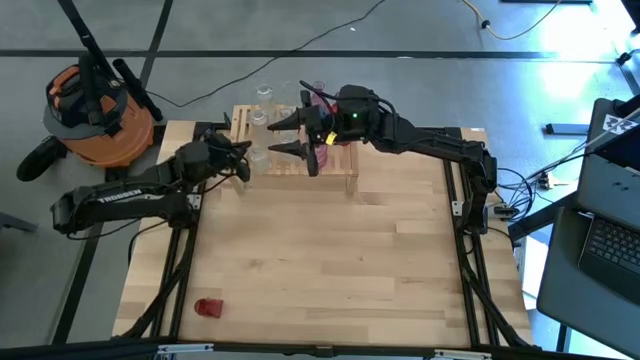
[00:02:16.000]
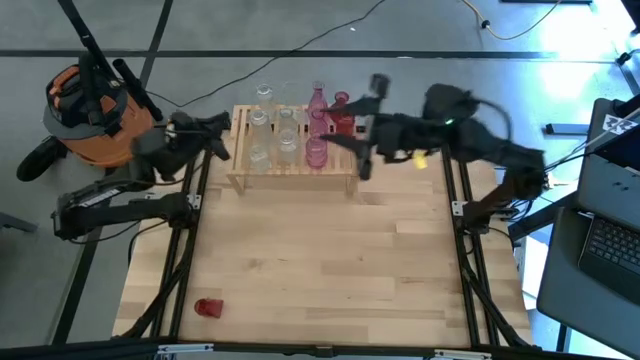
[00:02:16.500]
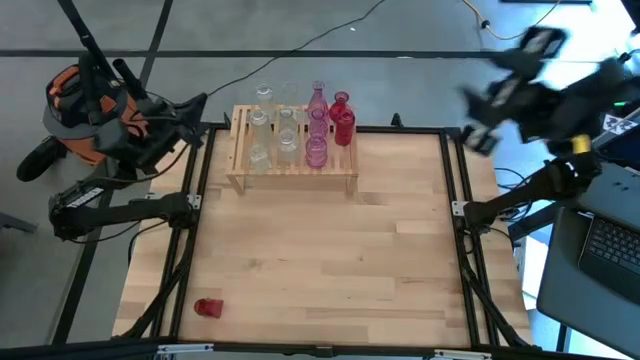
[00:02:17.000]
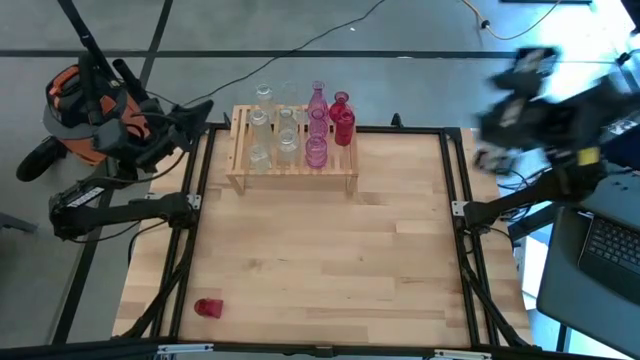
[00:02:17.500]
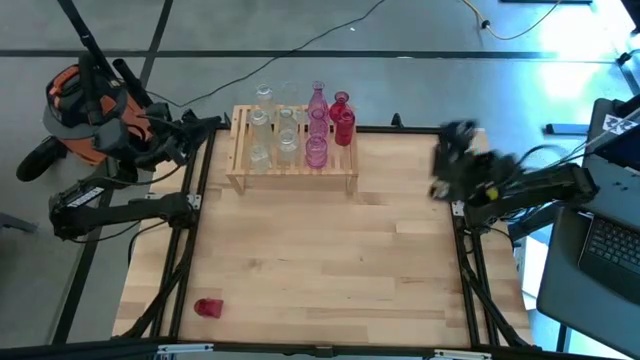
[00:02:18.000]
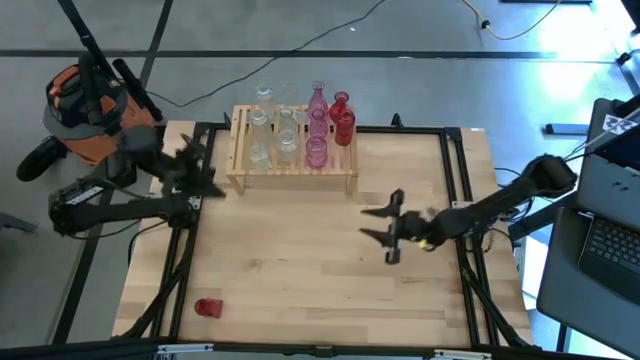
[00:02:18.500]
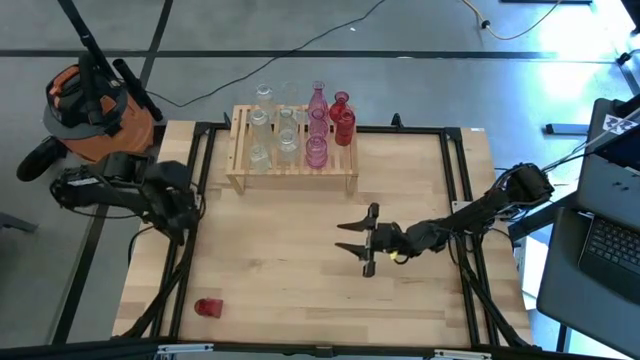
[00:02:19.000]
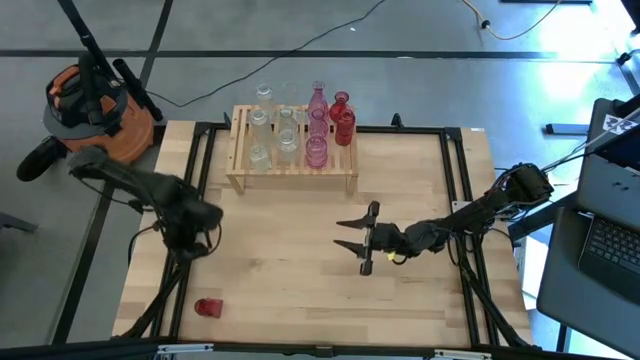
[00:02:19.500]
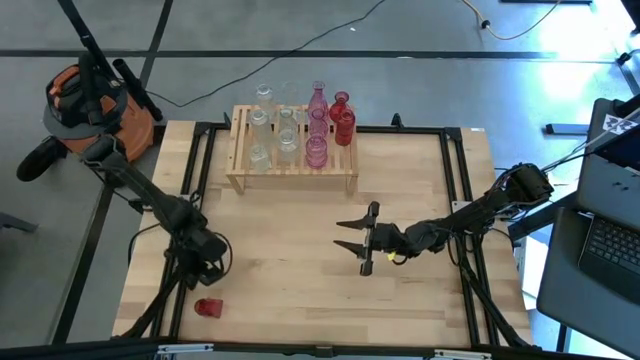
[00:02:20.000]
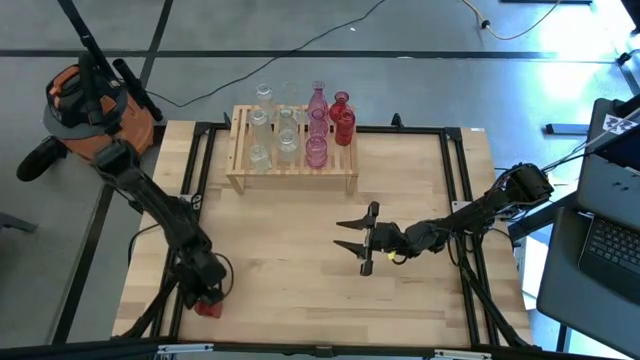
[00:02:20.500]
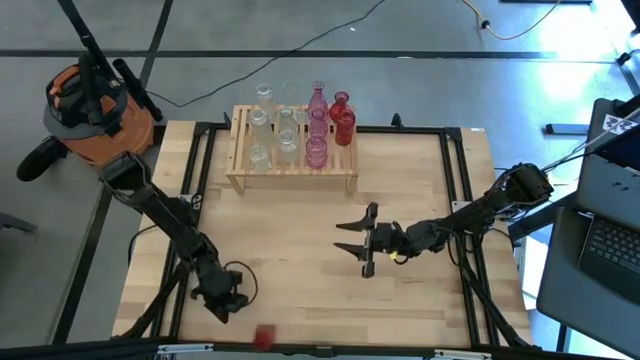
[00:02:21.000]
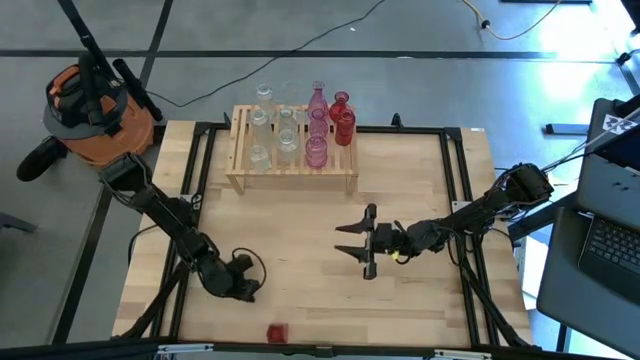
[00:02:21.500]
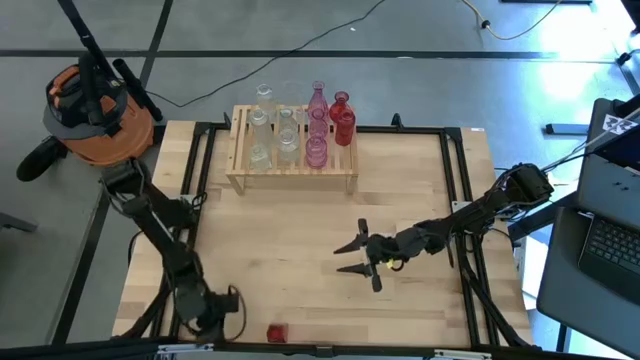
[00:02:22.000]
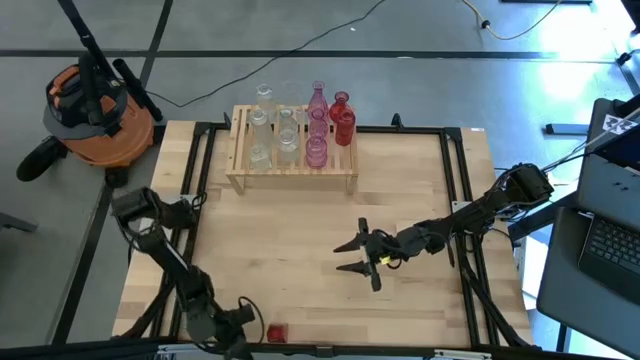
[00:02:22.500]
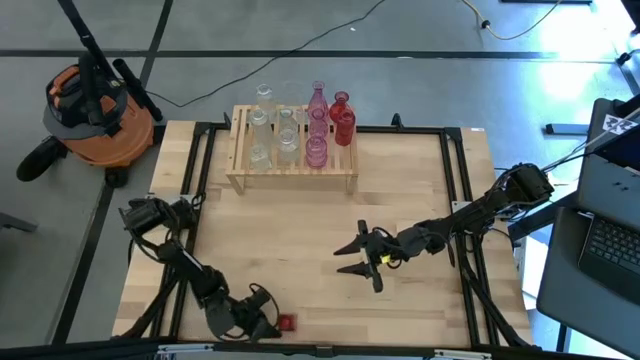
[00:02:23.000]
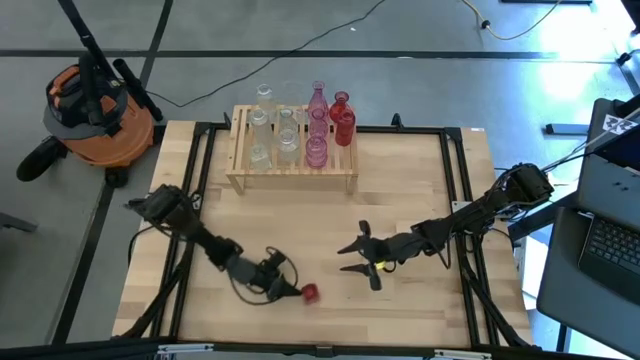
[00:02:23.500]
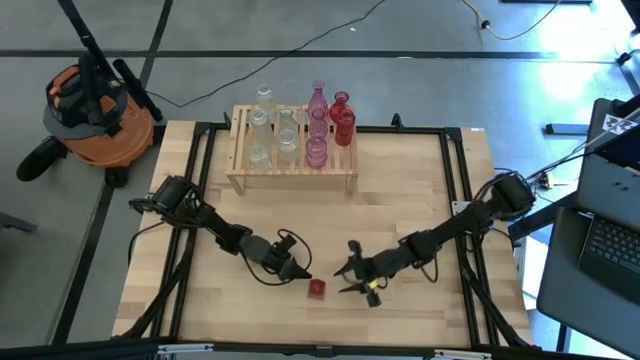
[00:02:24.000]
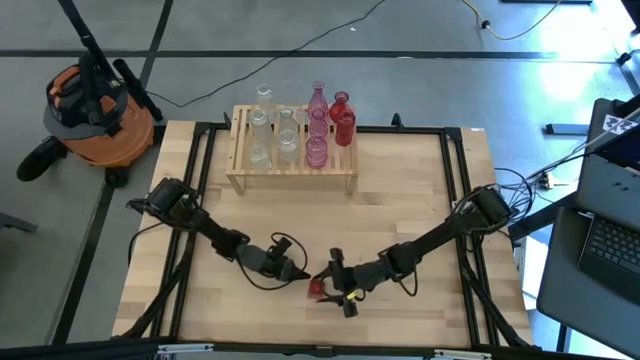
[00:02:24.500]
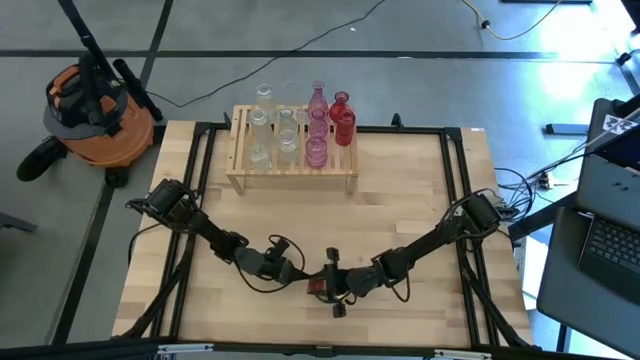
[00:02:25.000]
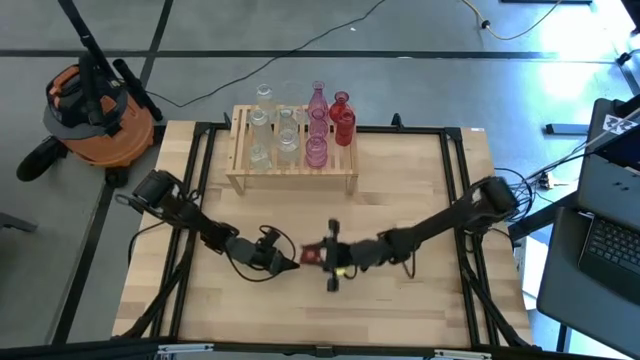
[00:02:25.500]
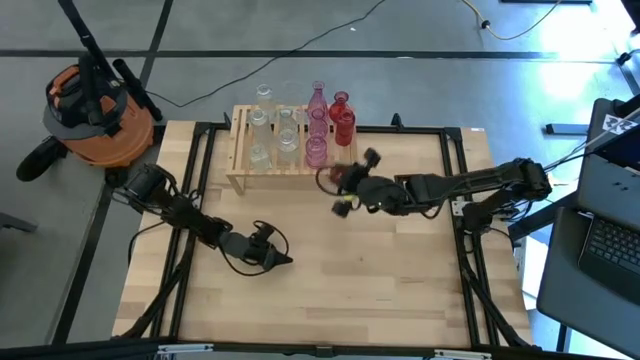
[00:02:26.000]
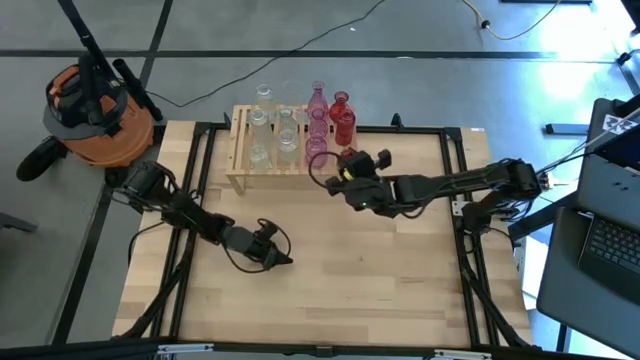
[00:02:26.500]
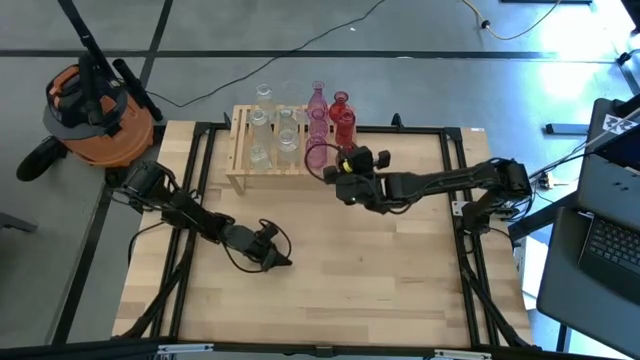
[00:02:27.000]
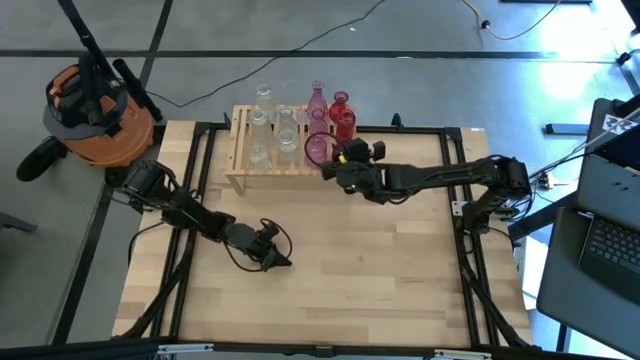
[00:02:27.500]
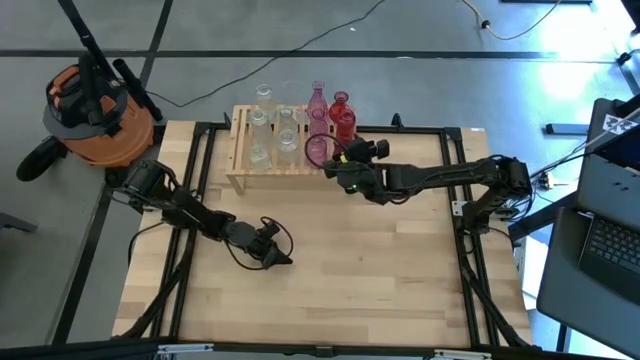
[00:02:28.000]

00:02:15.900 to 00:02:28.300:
Task: sort vases onto shelf
Put the red vase on the shelf aligned with the other red vases

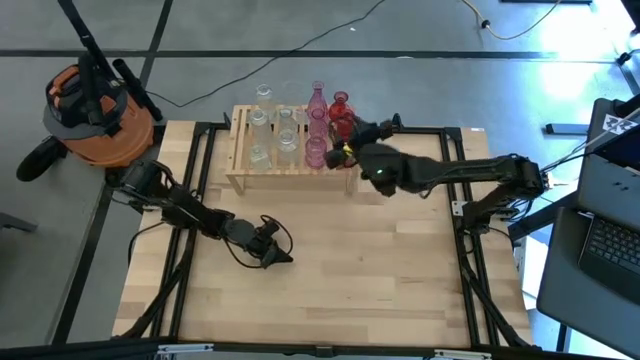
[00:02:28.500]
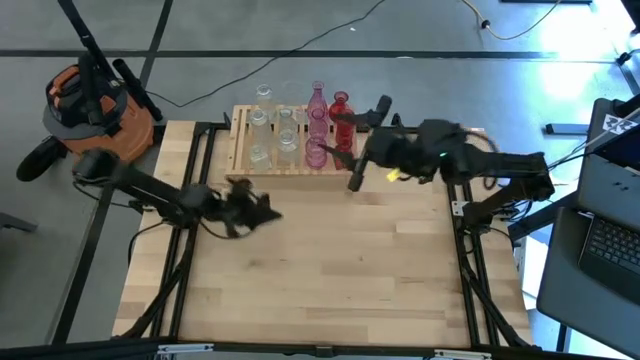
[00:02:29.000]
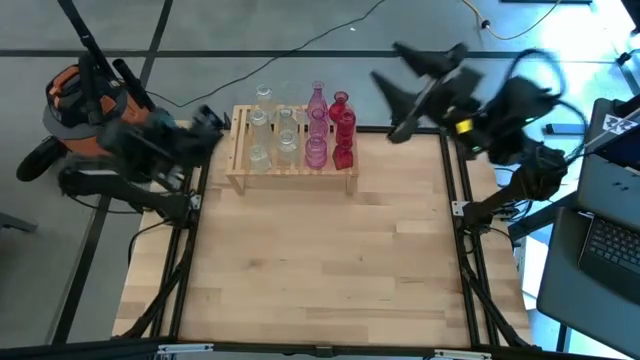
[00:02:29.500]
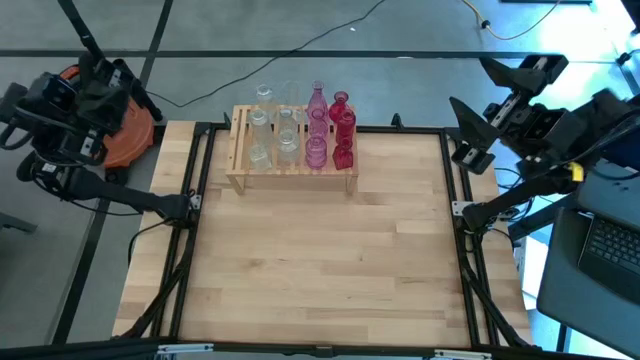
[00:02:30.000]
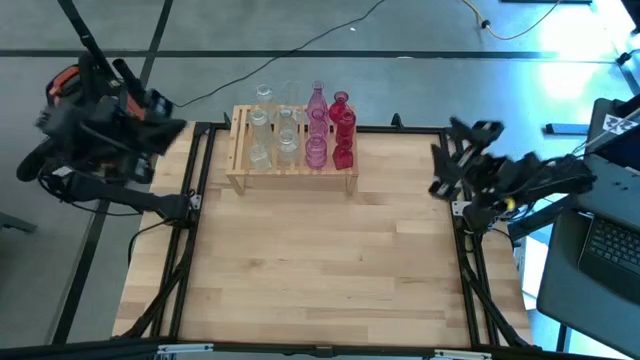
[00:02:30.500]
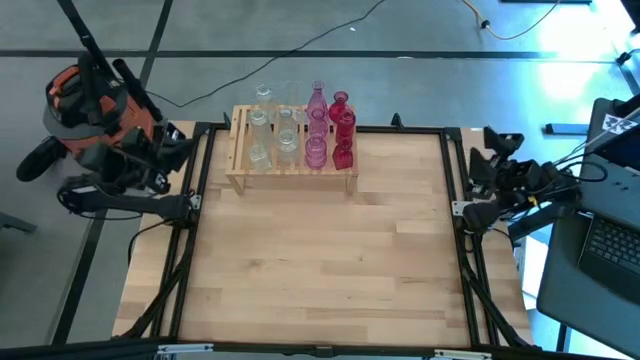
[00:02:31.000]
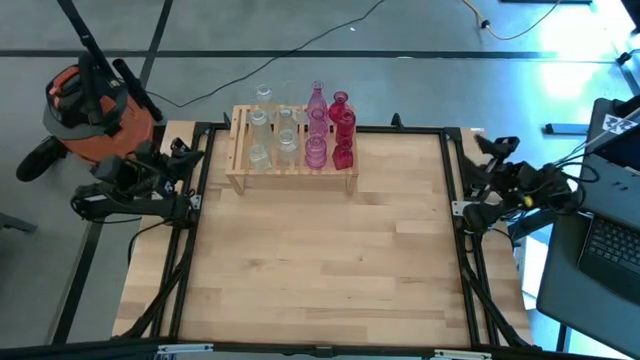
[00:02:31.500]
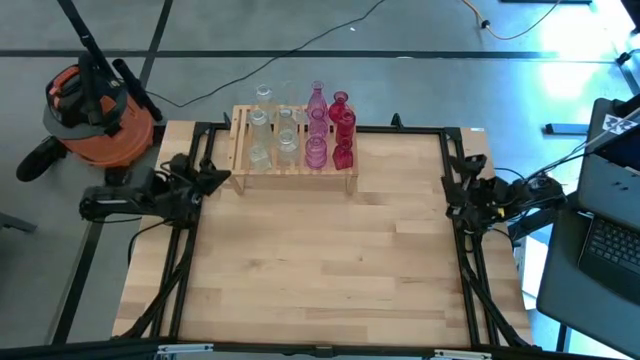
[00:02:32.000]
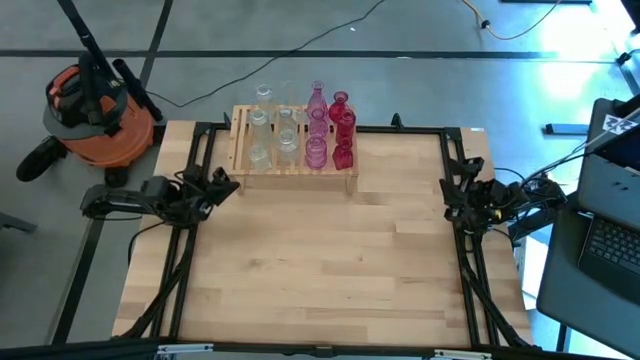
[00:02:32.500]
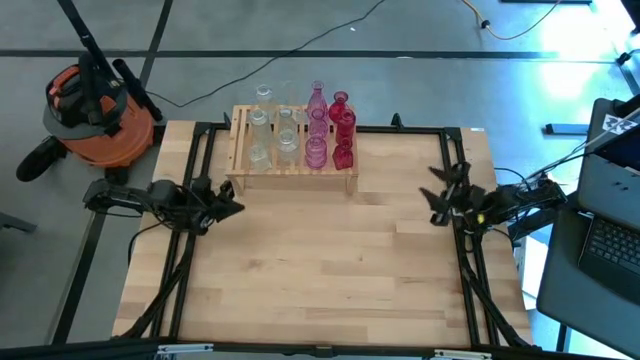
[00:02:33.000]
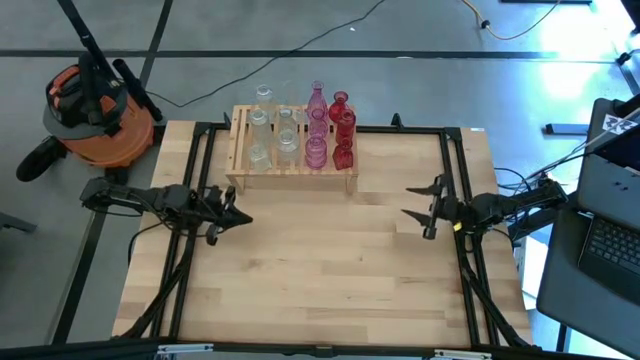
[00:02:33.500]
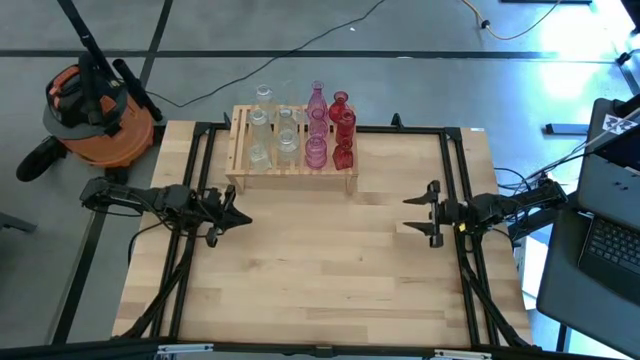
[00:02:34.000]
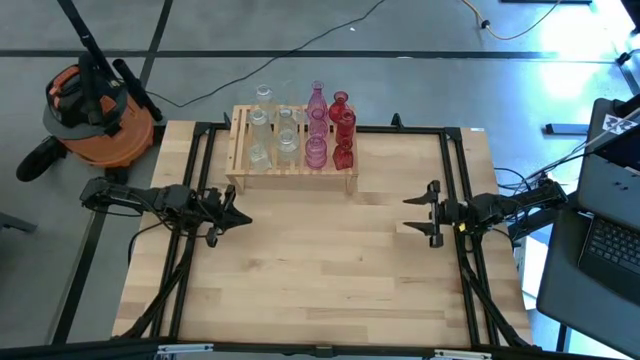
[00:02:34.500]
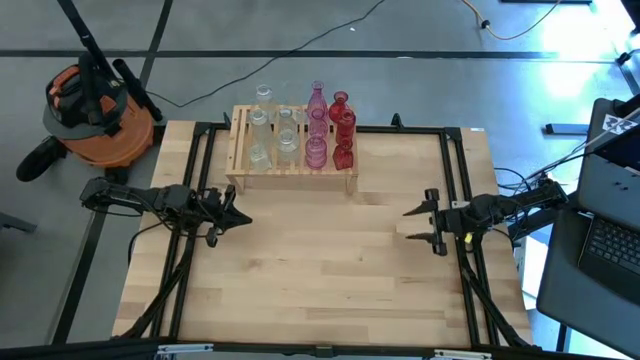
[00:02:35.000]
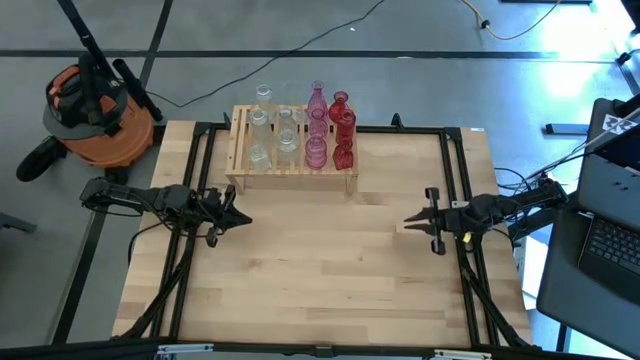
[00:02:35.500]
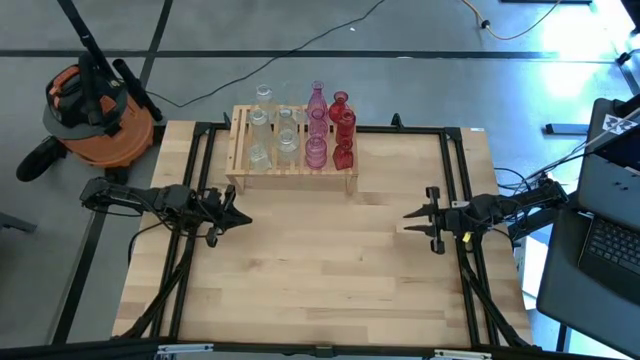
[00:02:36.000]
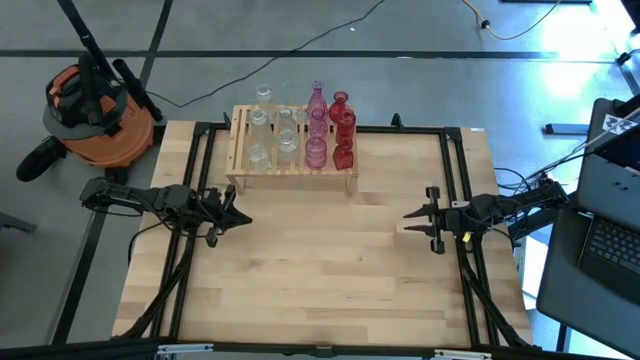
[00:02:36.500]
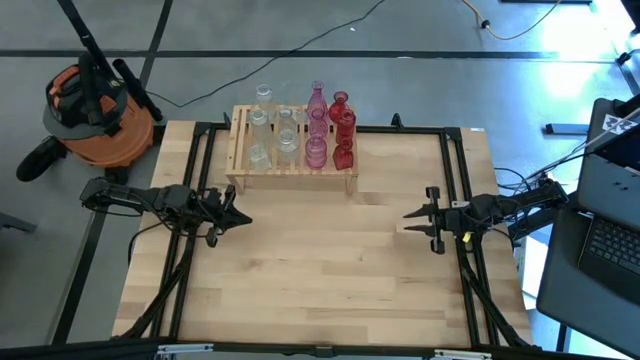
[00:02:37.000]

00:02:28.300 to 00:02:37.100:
Return to Home Position
